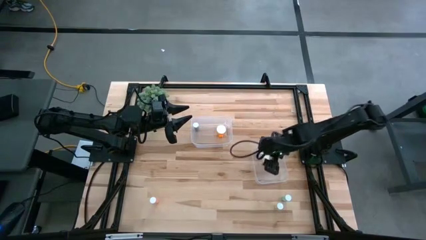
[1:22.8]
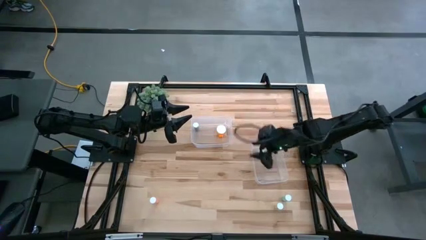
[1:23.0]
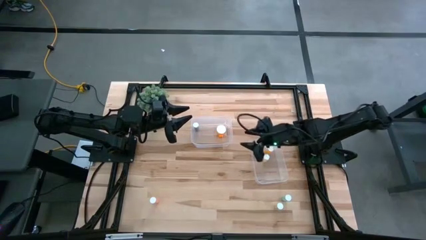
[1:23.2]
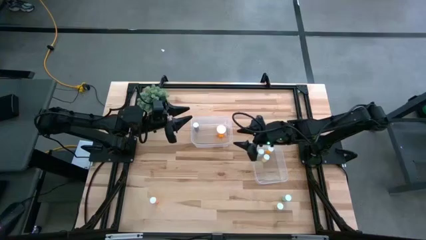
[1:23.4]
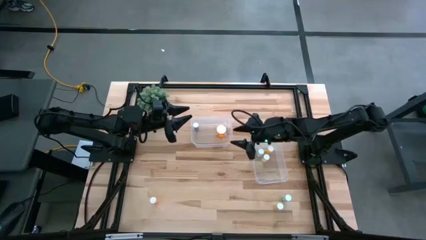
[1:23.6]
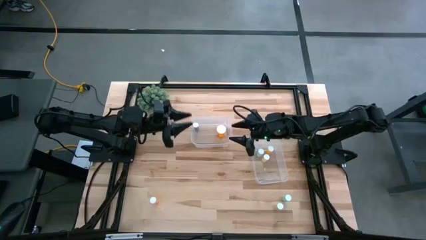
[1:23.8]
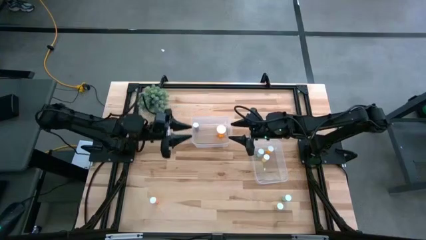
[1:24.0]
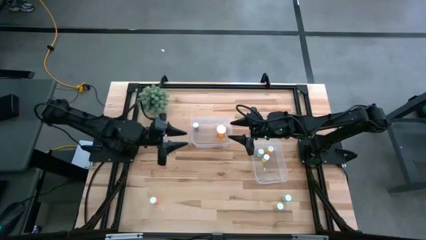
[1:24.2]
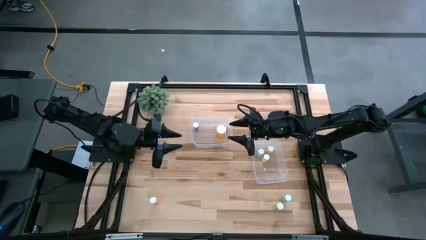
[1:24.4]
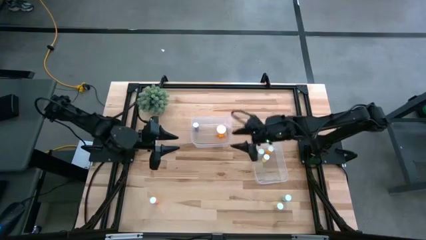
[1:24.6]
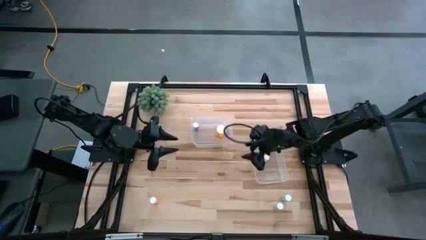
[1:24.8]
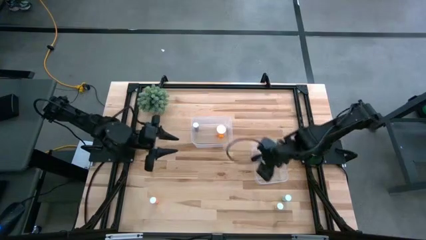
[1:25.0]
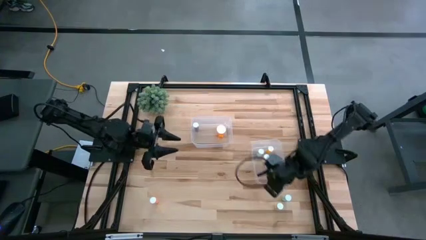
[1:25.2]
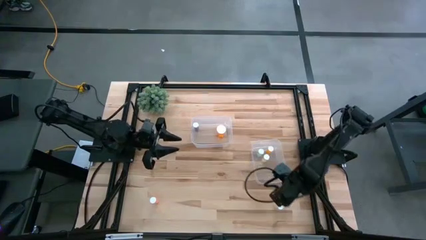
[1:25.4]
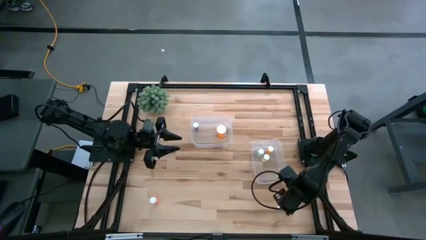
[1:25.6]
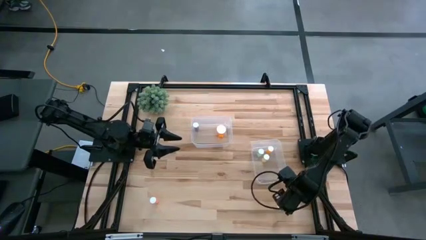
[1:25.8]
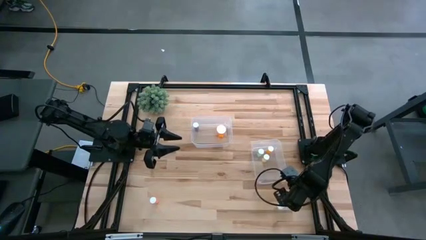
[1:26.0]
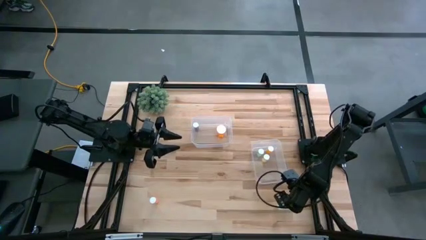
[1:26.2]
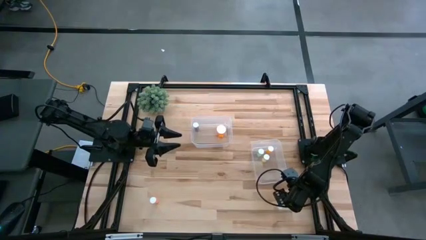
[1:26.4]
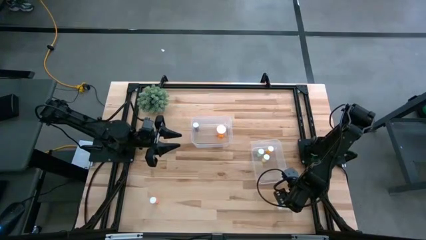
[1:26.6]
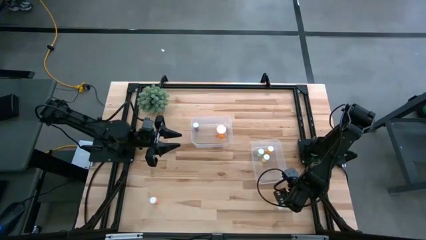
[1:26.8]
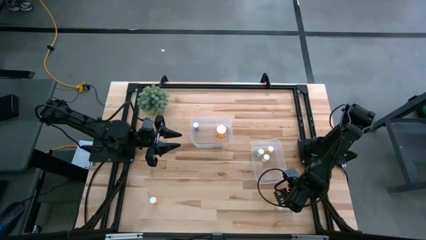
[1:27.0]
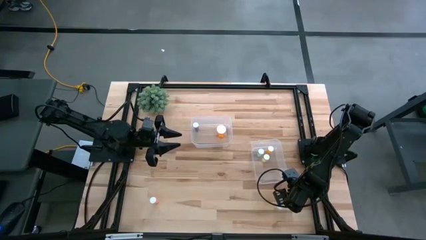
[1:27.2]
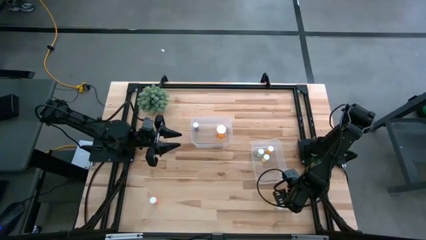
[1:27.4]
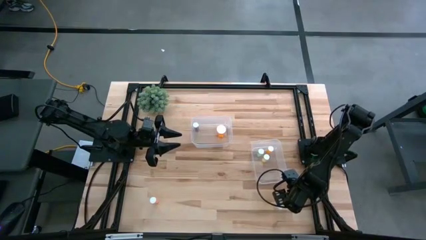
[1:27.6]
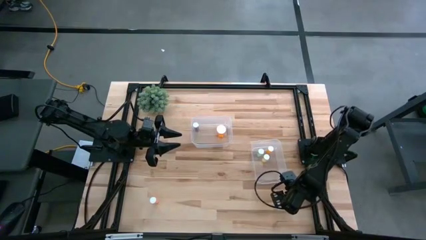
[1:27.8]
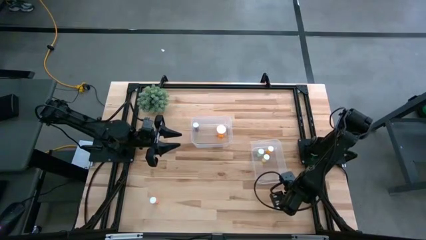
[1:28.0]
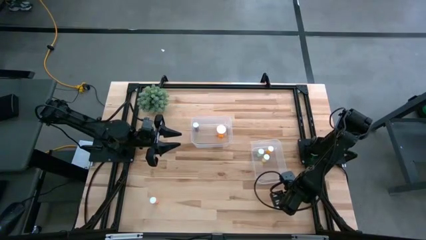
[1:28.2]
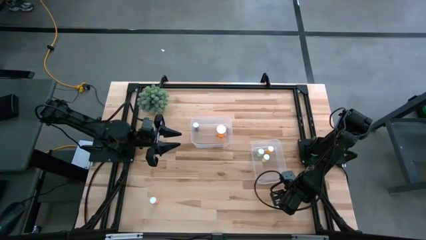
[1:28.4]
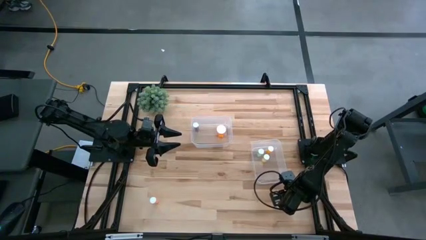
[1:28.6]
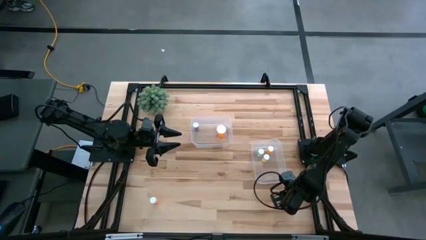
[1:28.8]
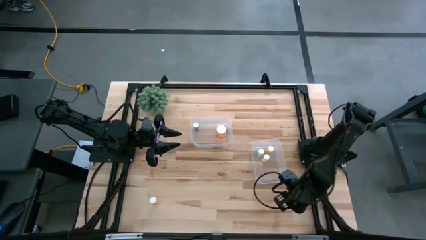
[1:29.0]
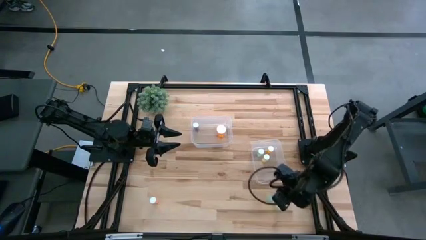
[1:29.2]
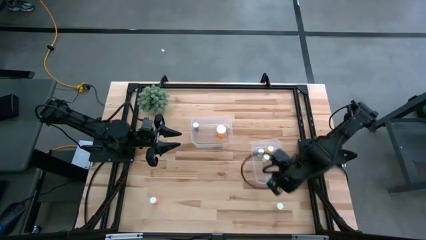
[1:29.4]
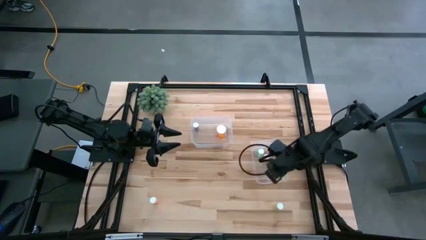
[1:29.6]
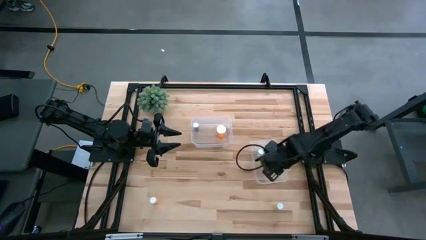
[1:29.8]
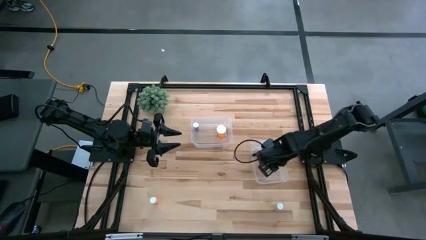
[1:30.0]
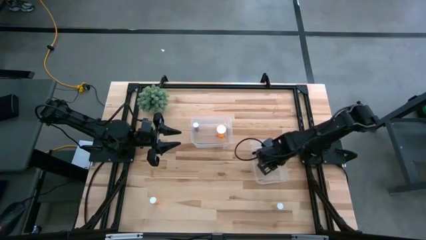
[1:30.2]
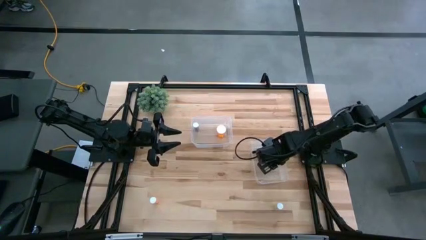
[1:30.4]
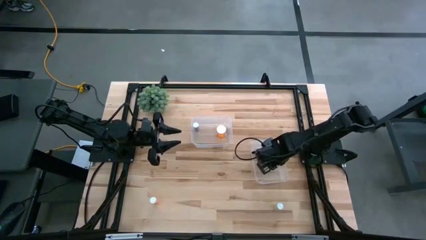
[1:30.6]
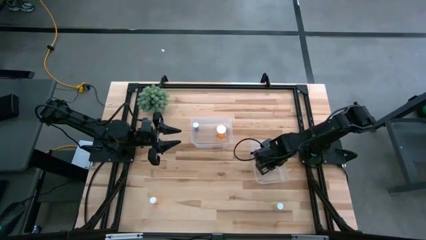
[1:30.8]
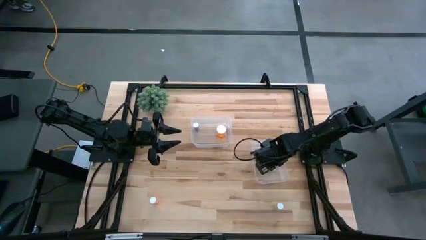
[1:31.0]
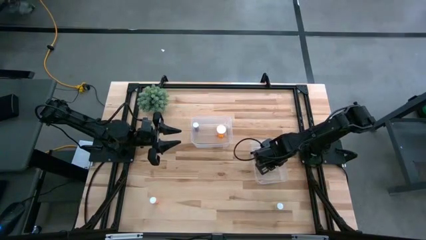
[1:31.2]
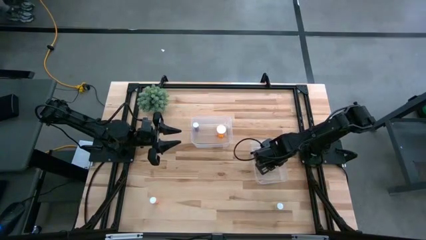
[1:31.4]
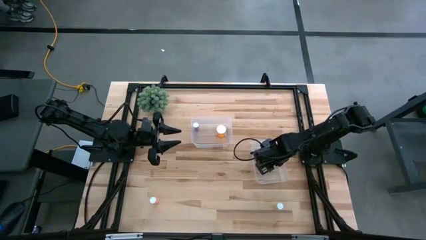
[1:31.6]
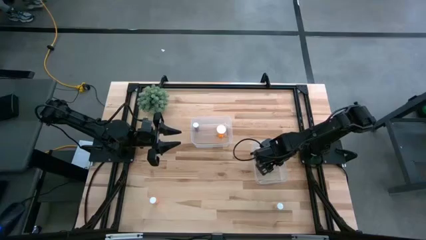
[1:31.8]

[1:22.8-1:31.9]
Task: Pick and place medicine bottles into bin by pill shape (circle, oval)
Put the blue tablet bottle into the bottom transparent bin

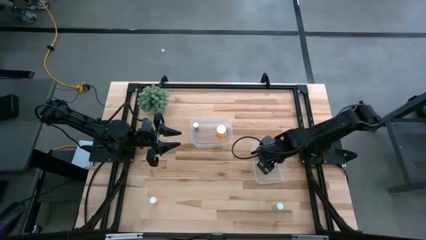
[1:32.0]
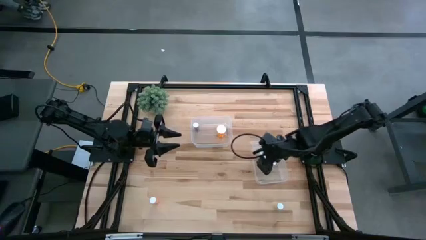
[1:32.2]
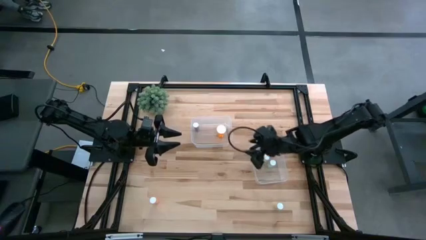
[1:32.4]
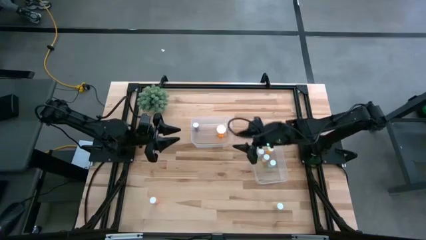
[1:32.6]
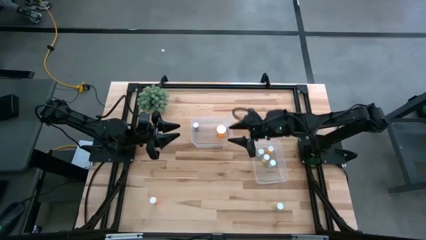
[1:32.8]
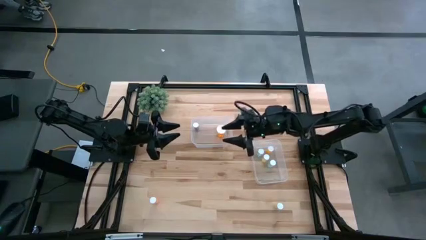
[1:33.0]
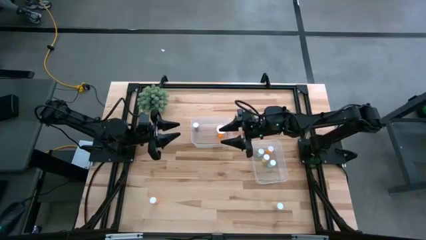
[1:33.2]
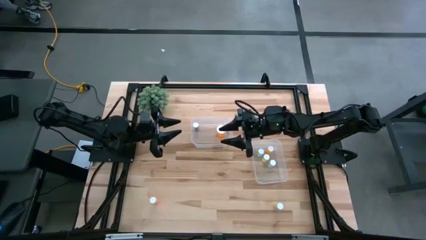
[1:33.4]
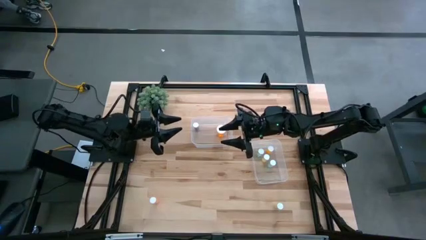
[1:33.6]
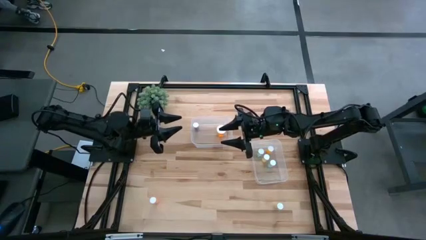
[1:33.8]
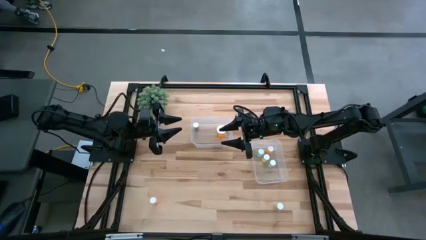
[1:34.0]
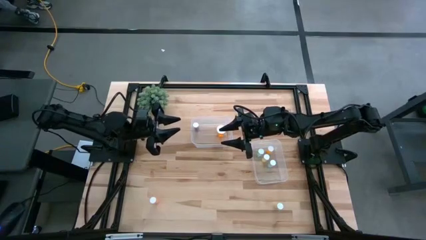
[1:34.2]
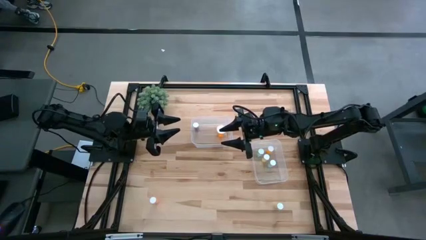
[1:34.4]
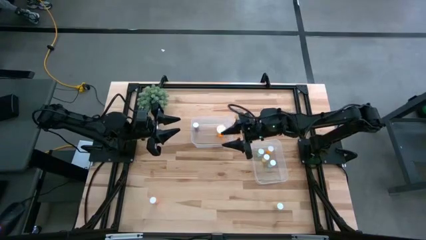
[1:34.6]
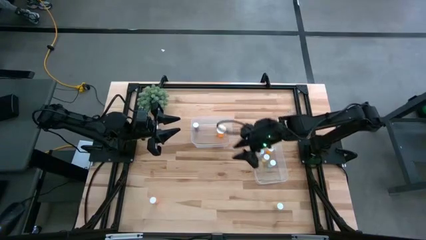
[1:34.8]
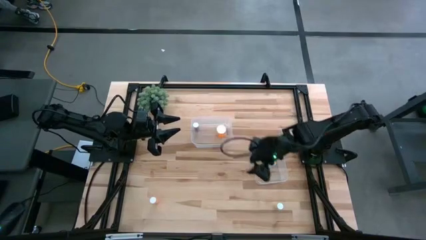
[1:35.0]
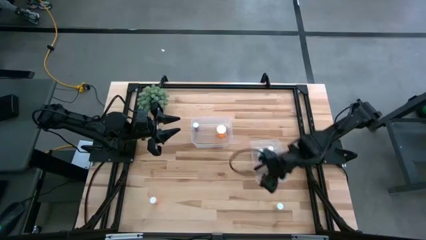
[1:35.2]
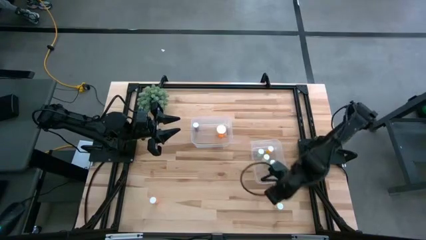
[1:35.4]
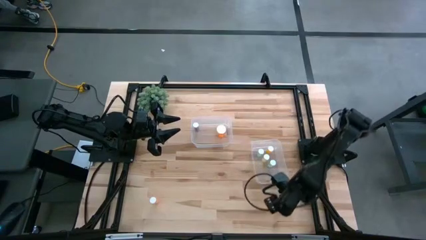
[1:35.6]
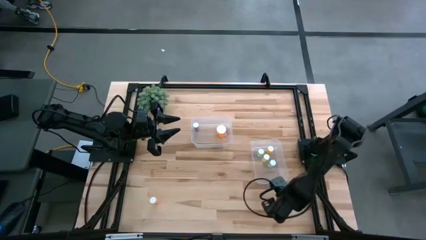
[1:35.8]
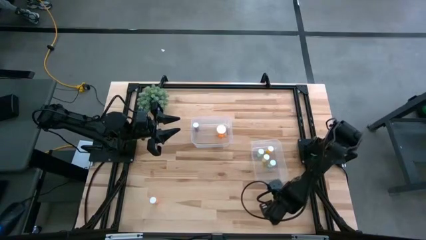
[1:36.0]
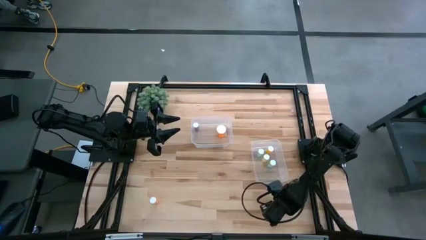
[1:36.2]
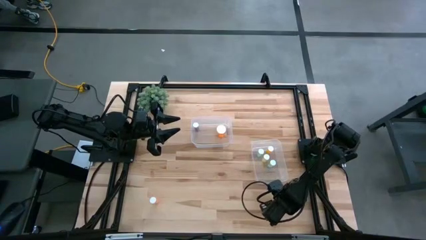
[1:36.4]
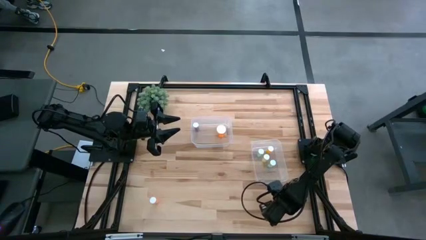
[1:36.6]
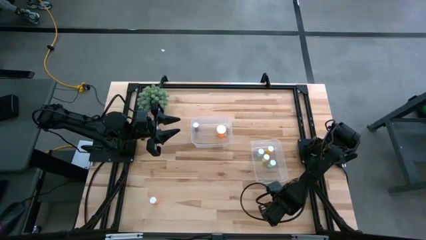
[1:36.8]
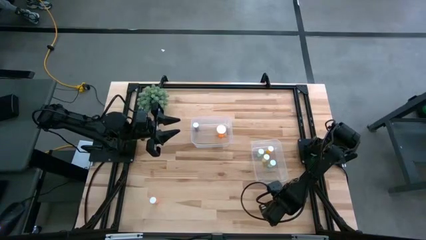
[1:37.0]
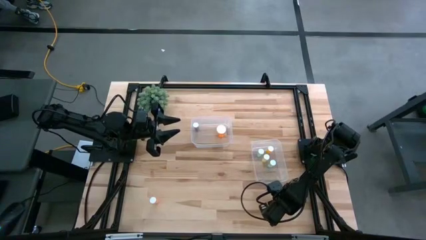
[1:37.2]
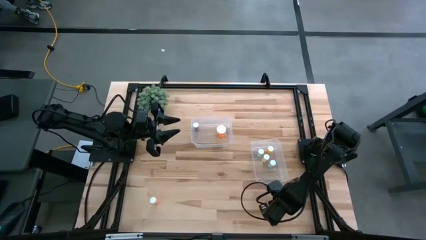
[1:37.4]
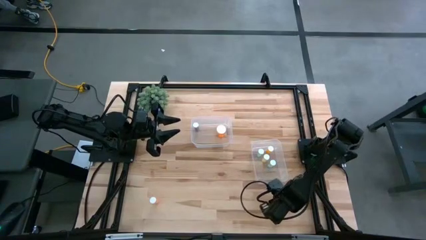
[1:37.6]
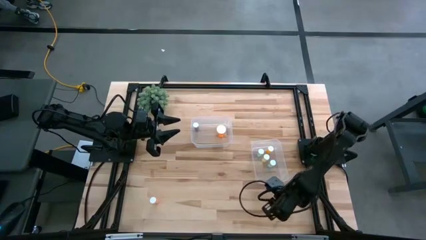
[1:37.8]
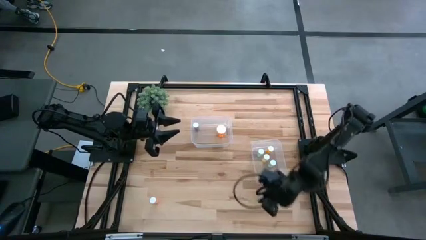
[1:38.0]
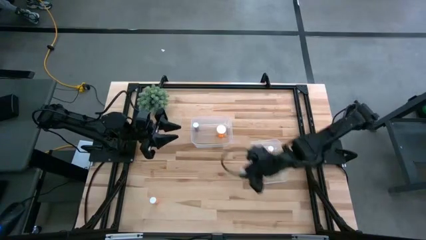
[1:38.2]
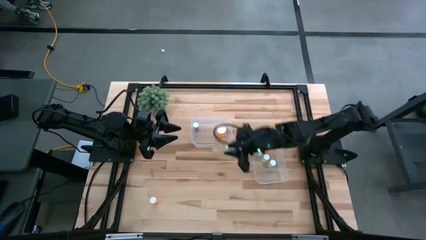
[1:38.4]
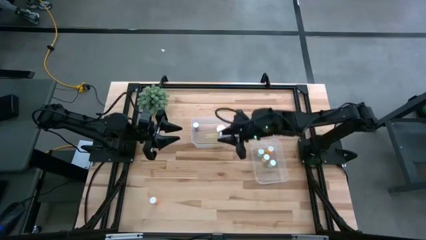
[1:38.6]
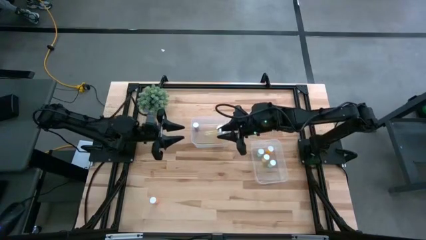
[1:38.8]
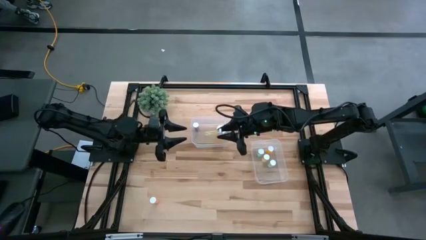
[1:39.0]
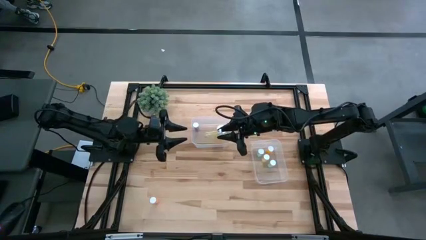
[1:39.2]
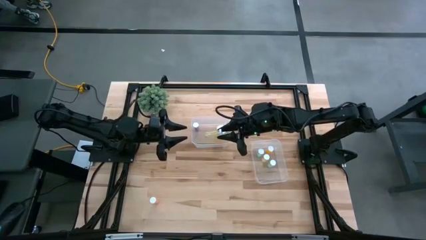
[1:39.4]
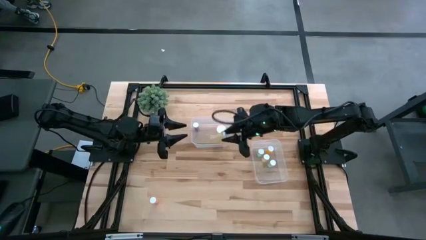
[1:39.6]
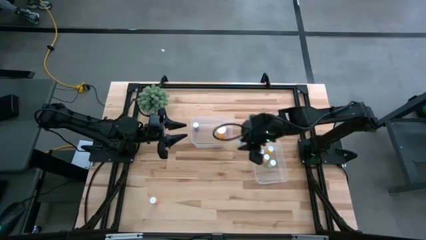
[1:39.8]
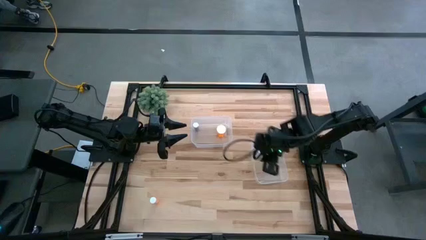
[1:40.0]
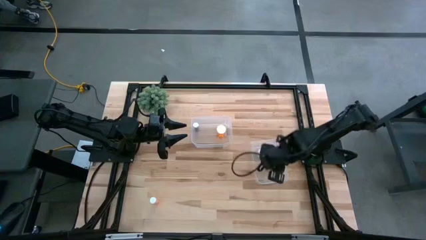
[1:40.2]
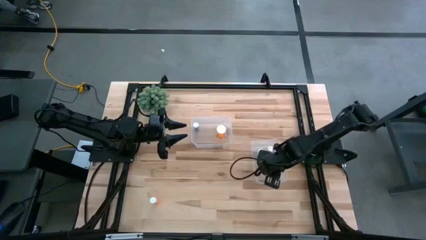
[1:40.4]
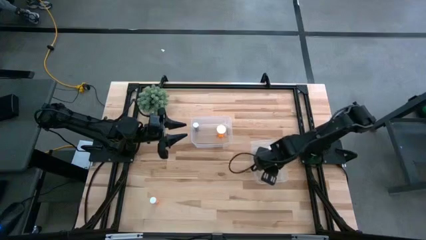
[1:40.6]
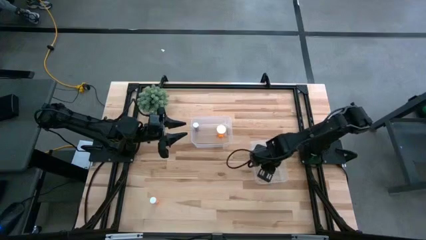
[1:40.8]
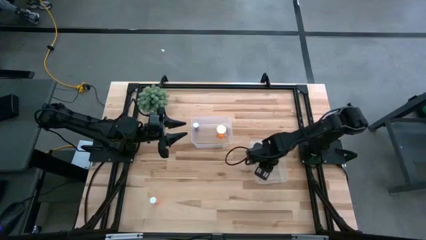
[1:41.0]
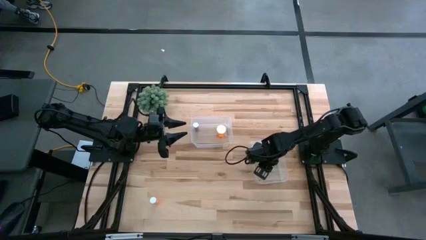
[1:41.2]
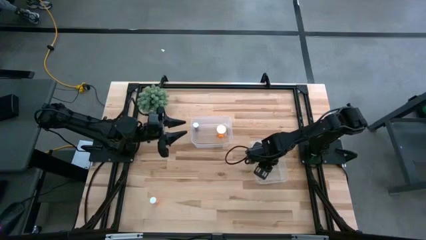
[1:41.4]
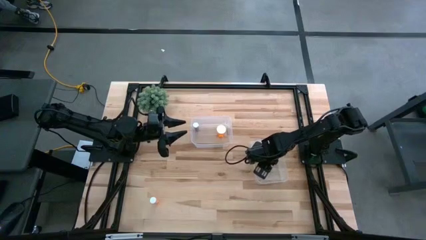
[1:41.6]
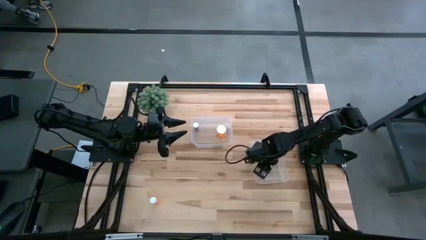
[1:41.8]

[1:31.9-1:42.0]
Put the yellow tablet bottle into the bottom transparent bin
